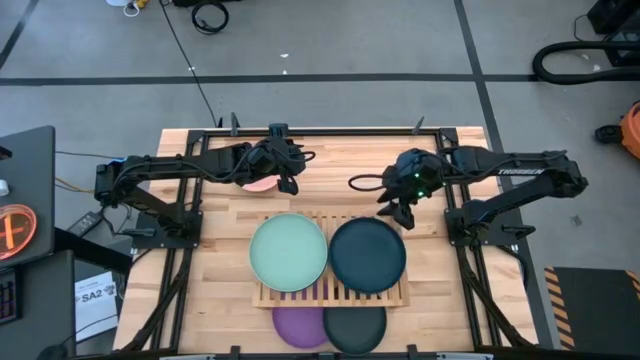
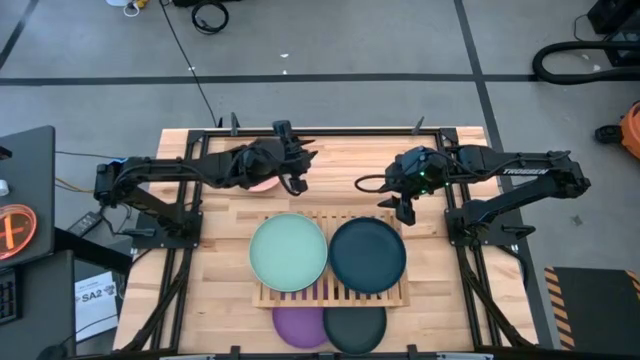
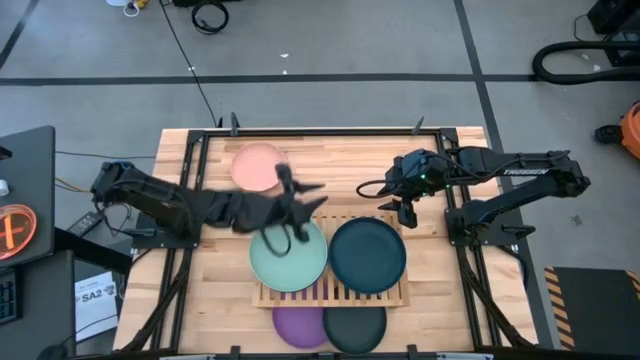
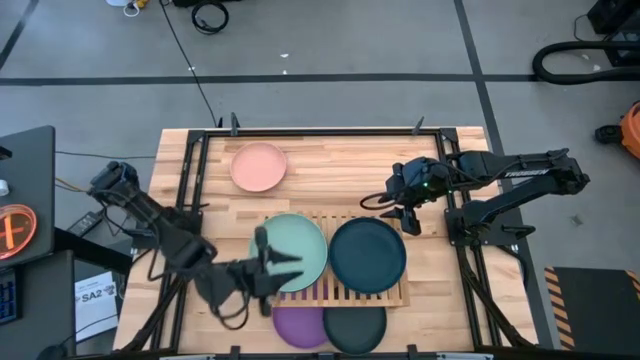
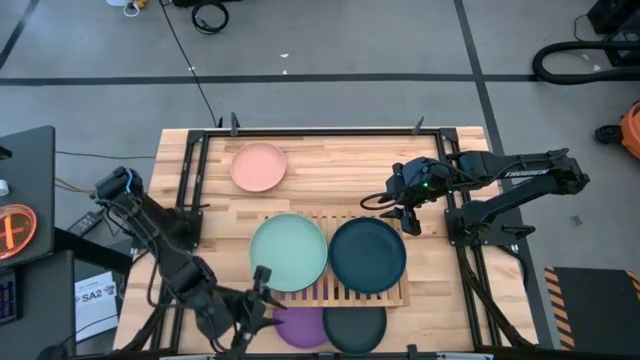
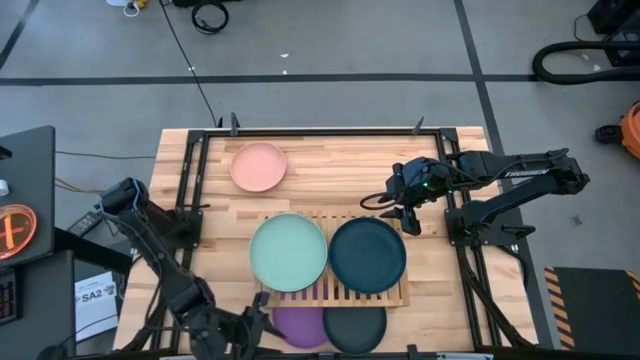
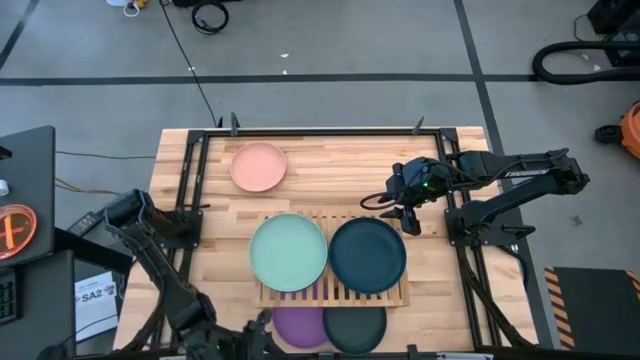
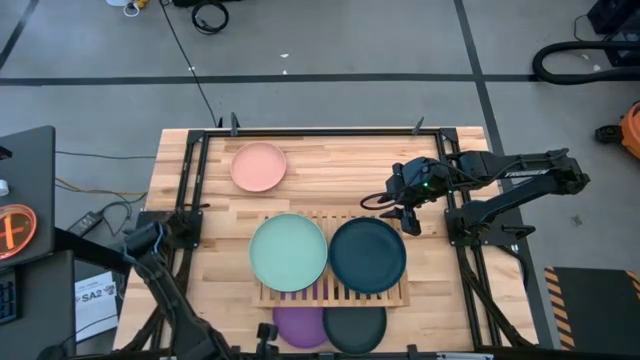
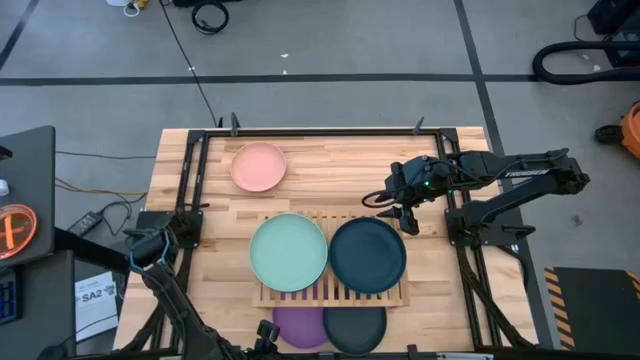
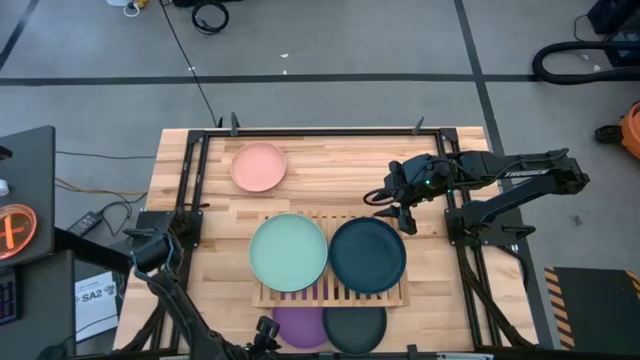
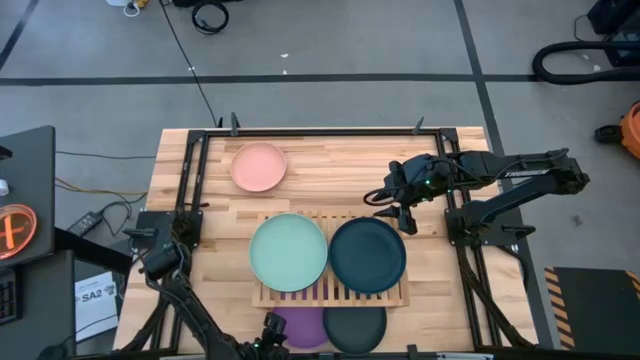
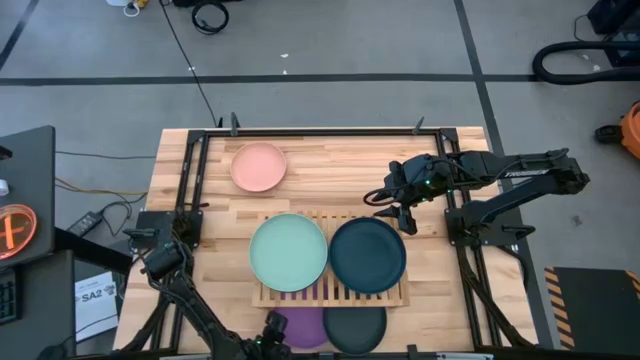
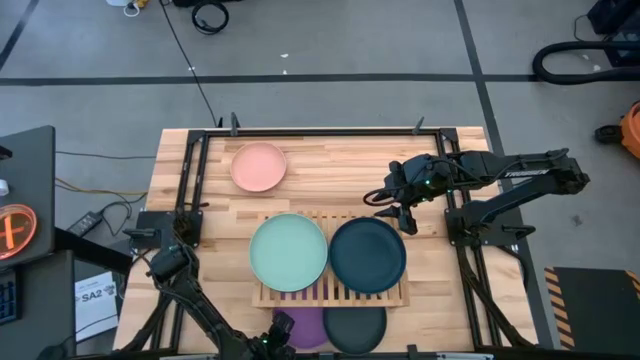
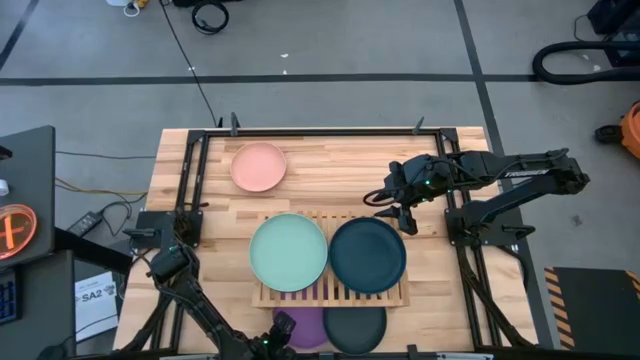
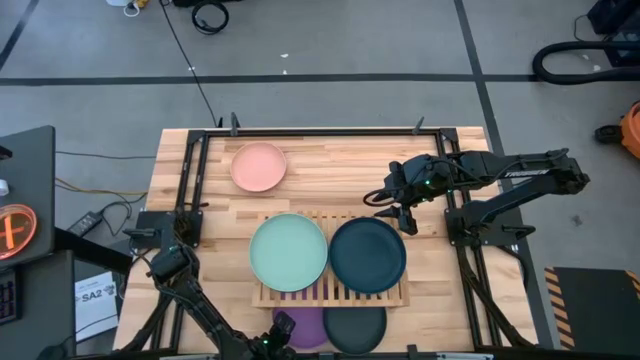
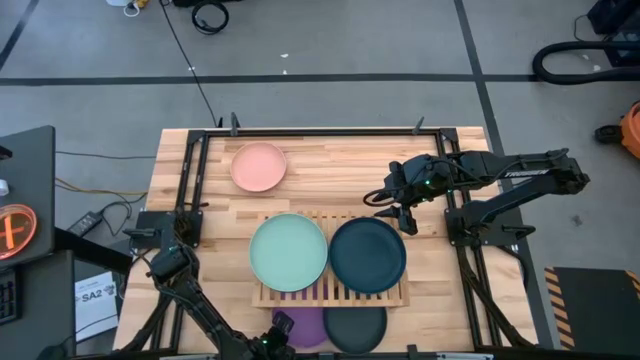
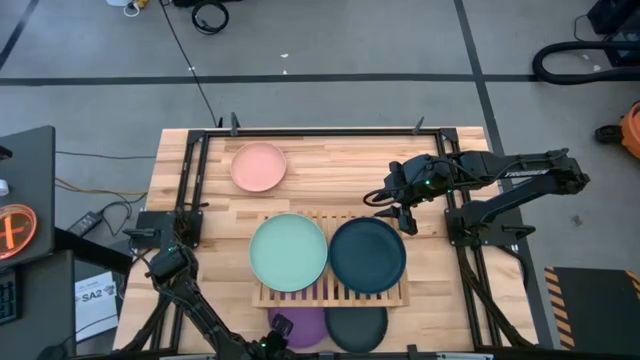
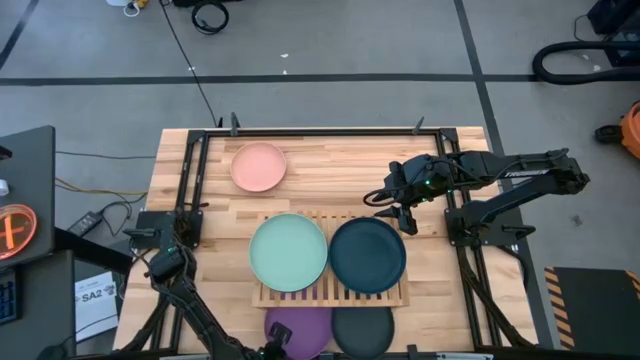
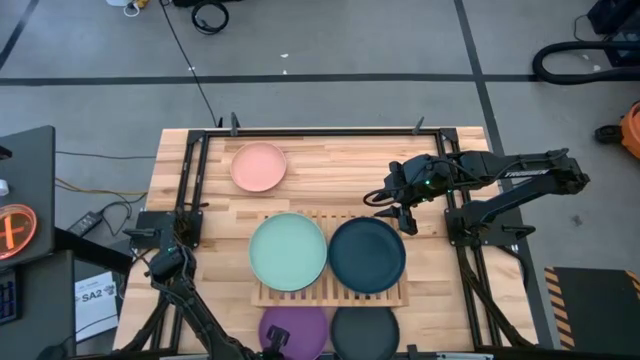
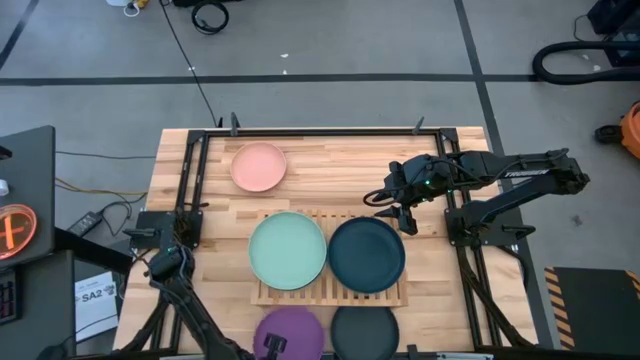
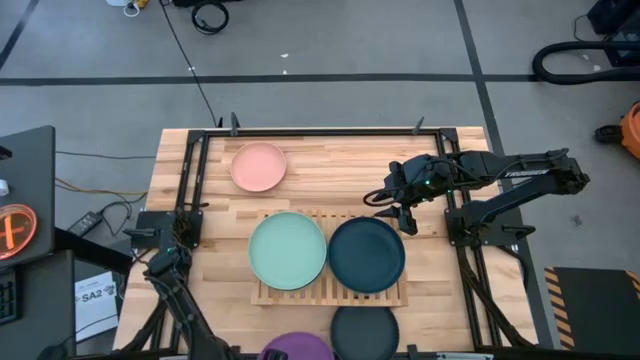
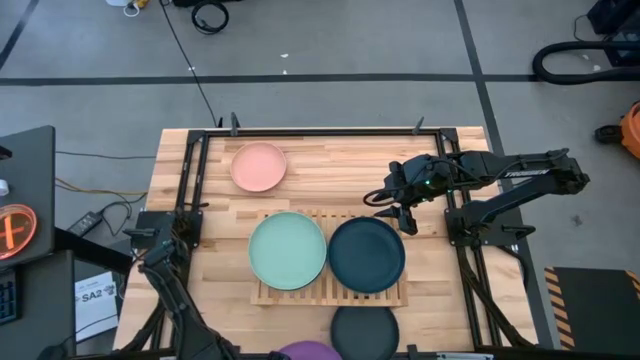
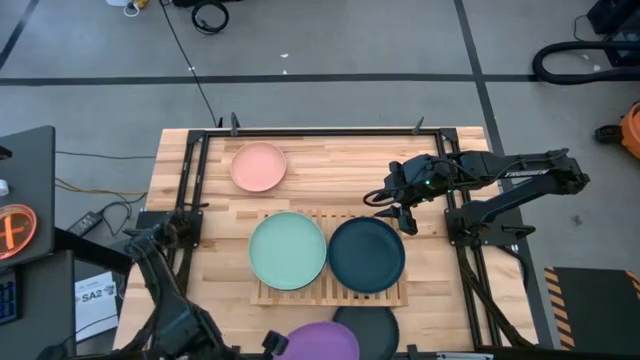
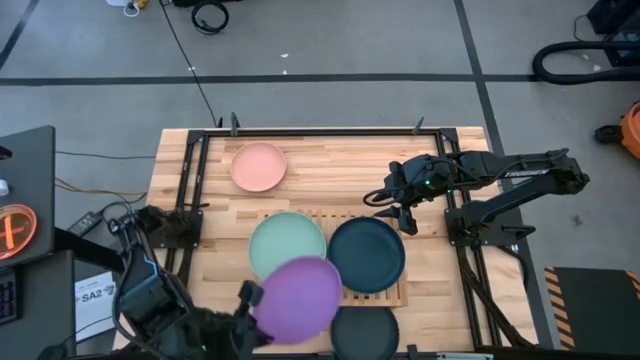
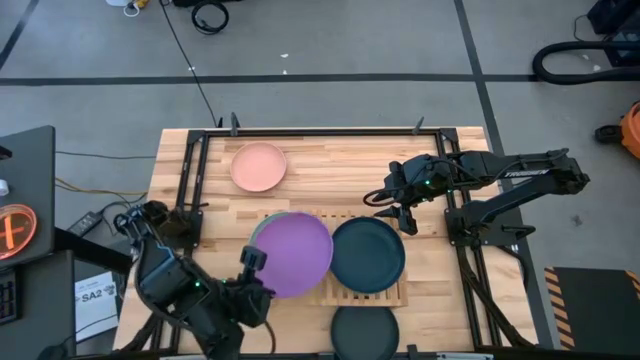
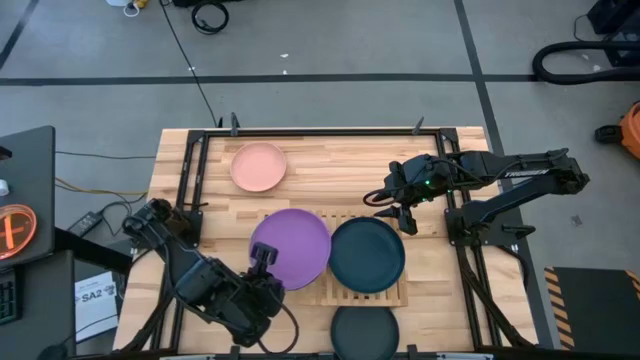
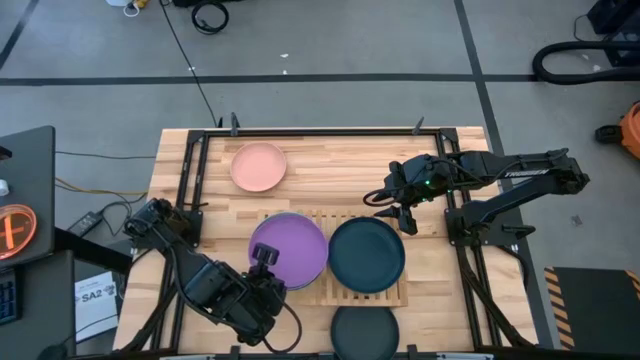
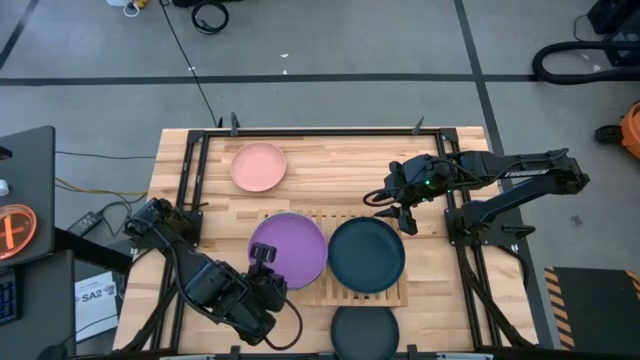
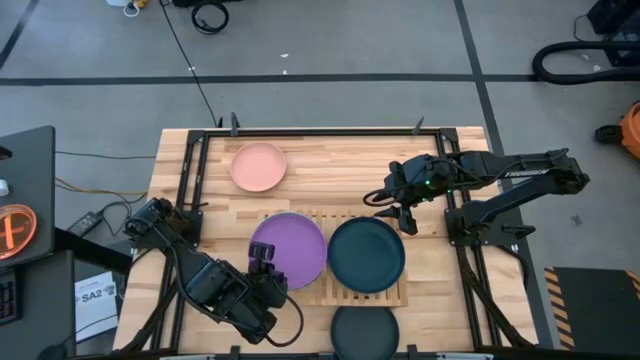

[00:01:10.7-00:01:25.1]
Task: Place and stack plates onto a shelf
Stack the purple plate on top of the light green plate on the shelf

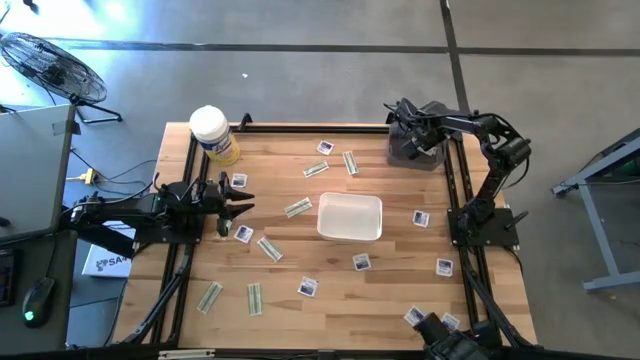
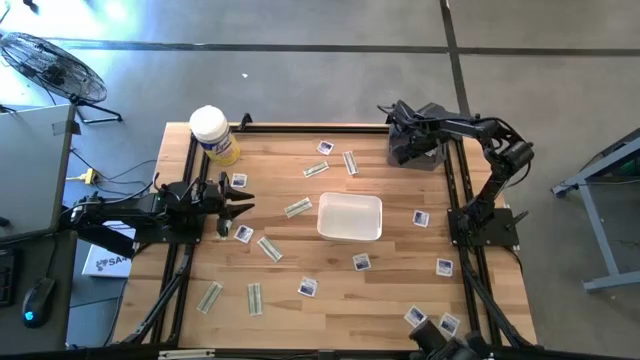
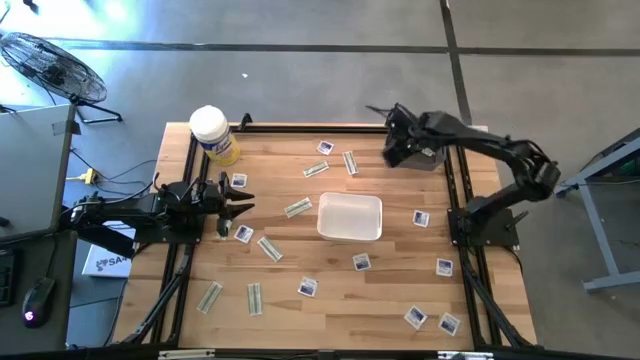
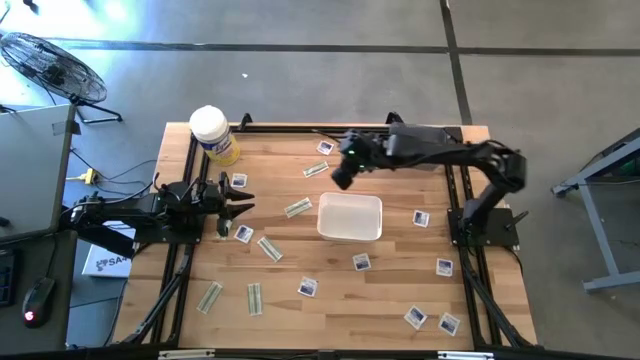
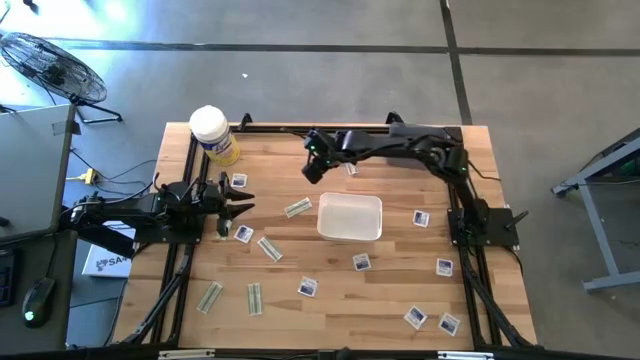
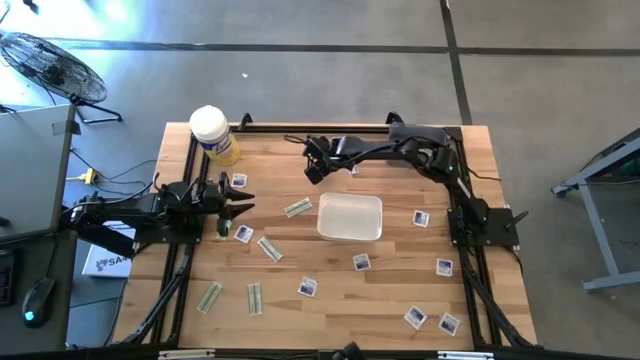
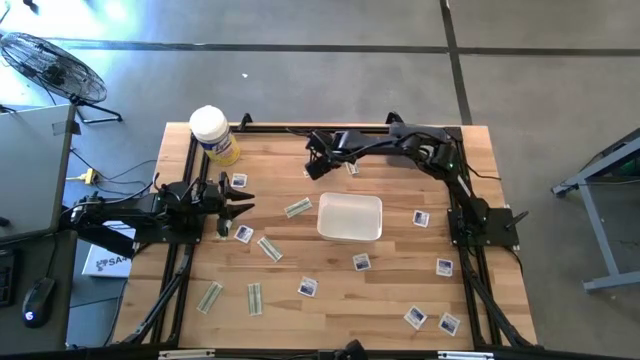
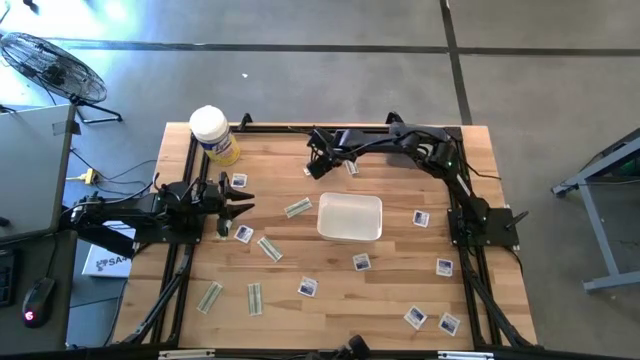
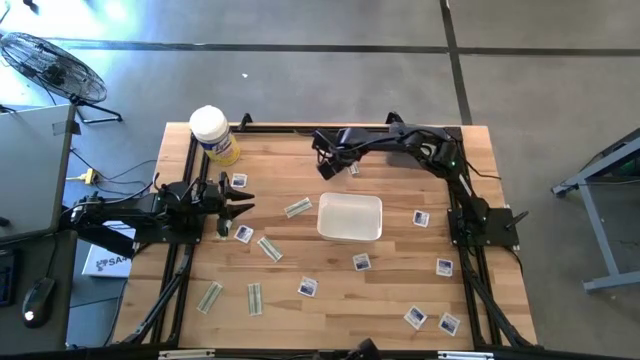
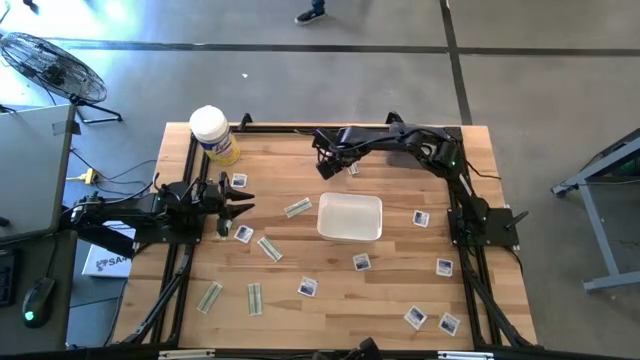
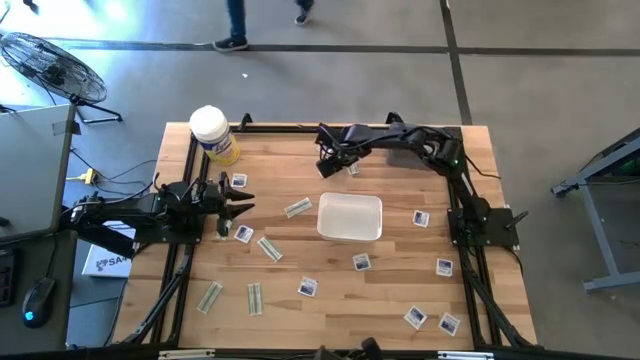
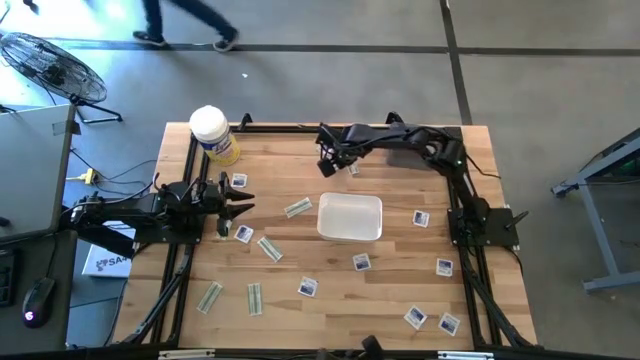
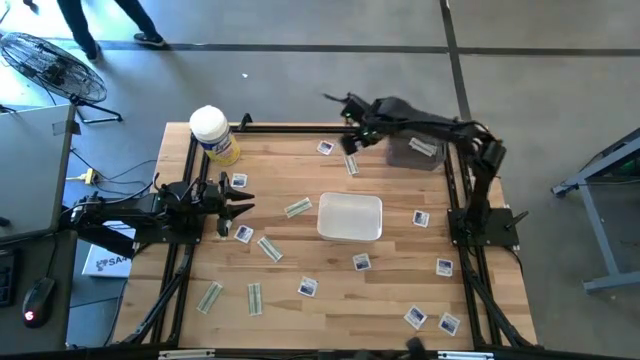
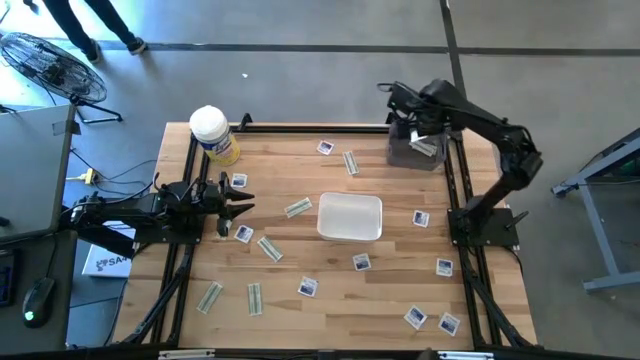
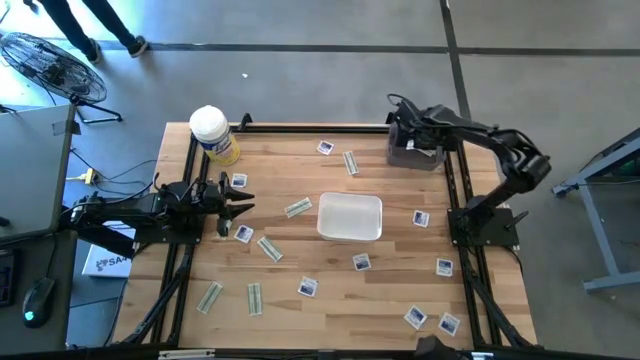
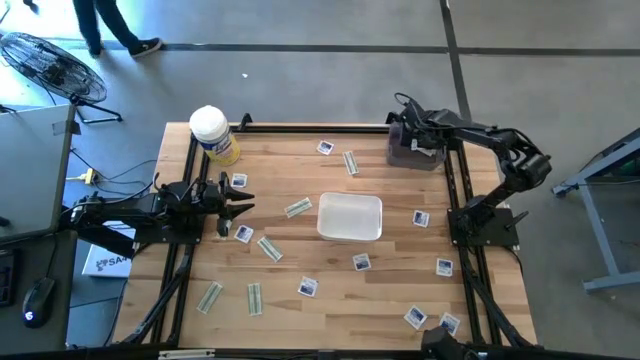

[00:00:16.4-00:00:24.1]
Task: Pick & Place First Aid Supplies
Put the green bandage into the black bin
